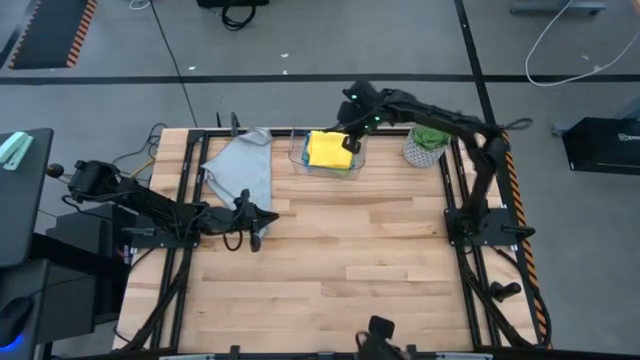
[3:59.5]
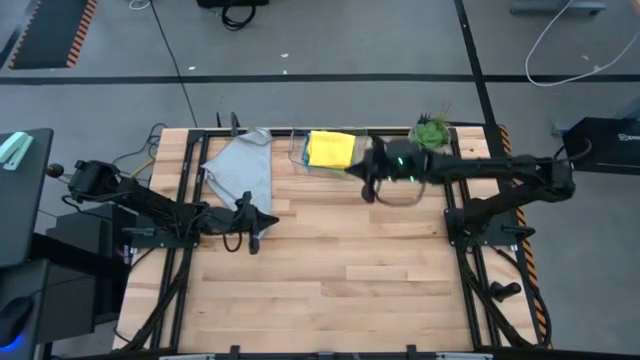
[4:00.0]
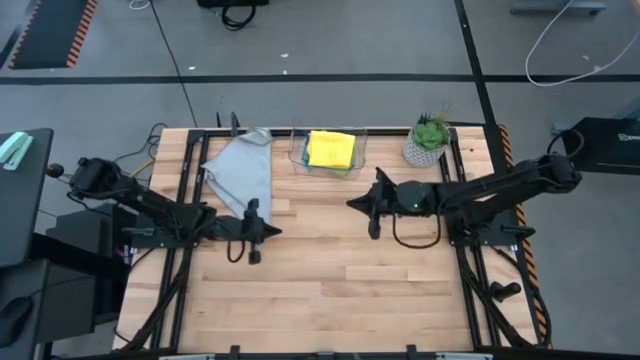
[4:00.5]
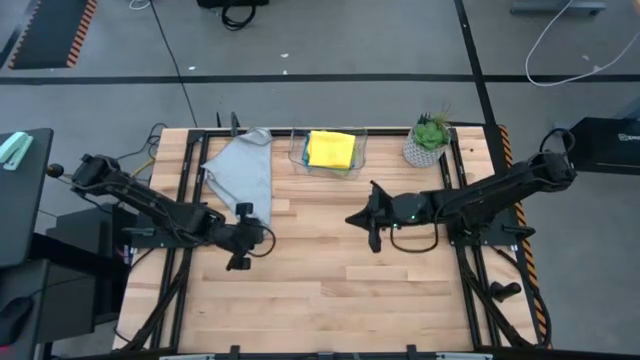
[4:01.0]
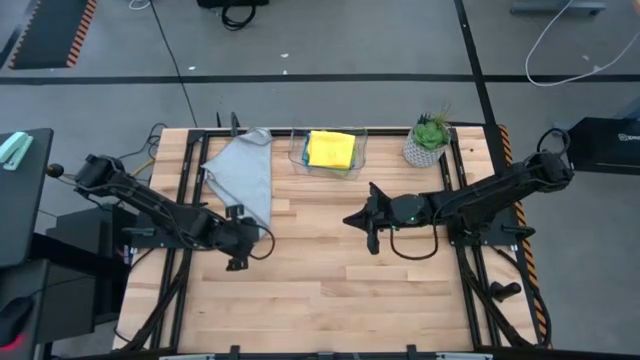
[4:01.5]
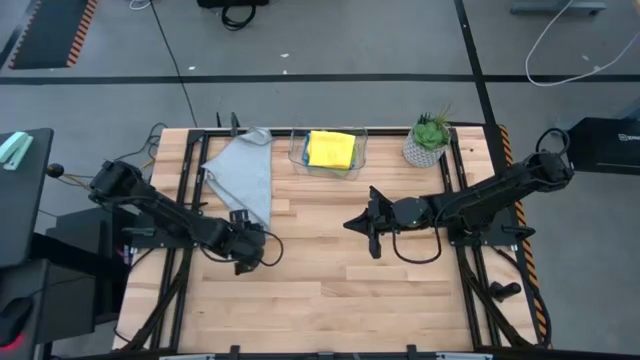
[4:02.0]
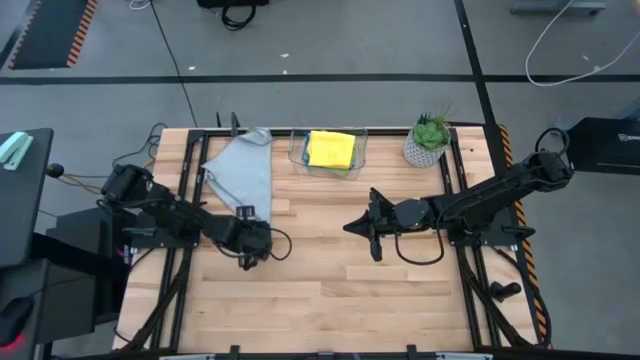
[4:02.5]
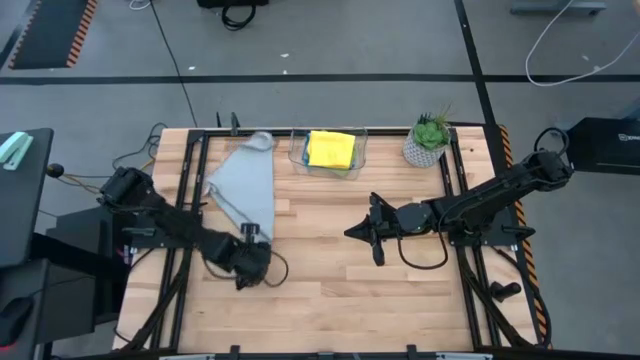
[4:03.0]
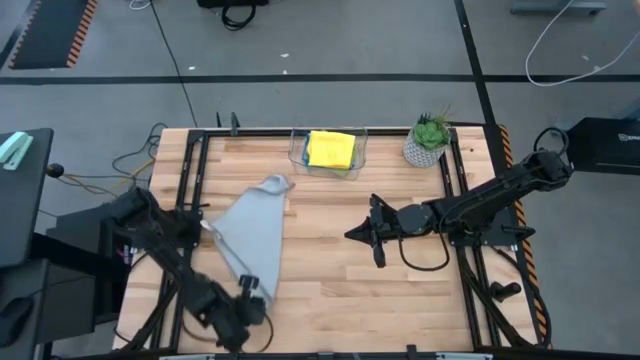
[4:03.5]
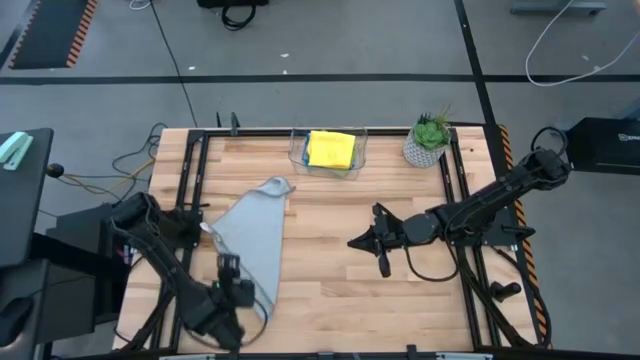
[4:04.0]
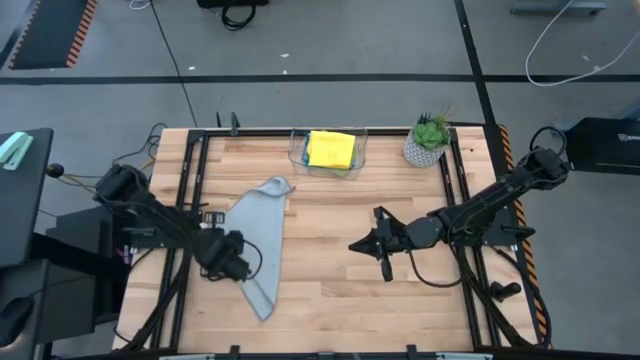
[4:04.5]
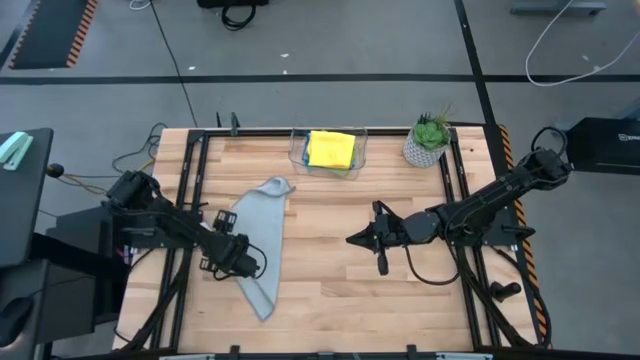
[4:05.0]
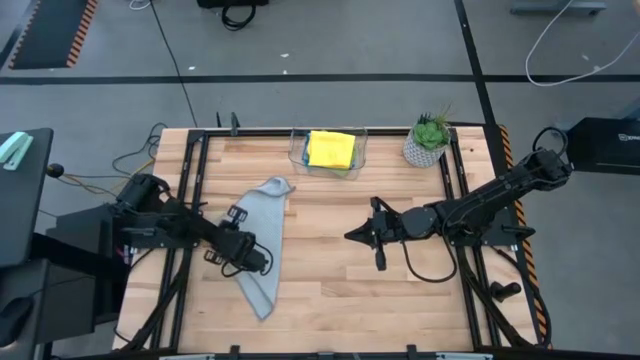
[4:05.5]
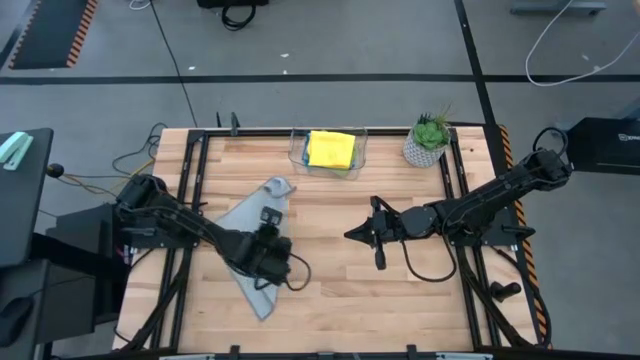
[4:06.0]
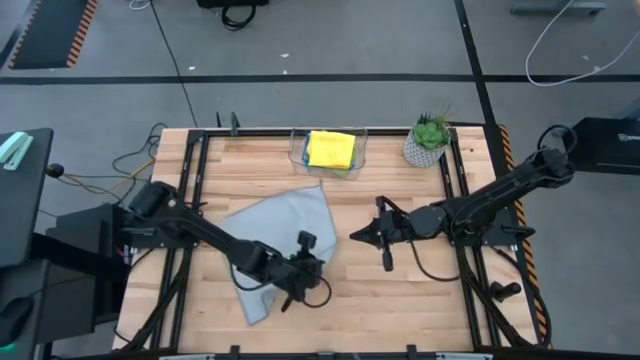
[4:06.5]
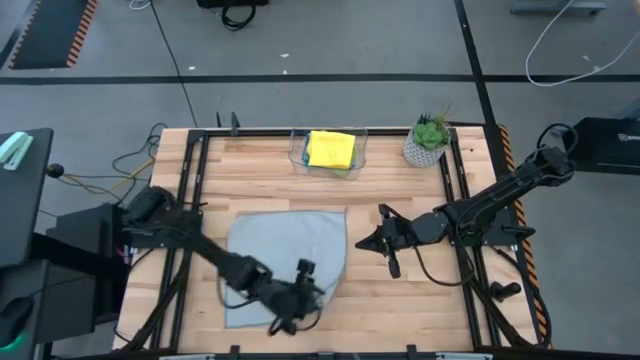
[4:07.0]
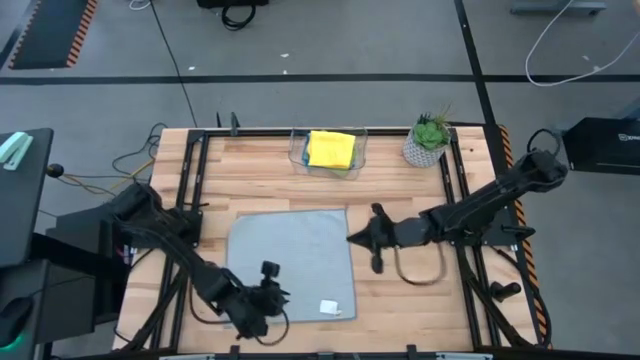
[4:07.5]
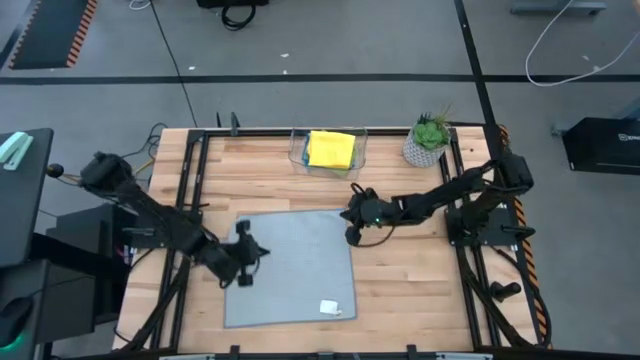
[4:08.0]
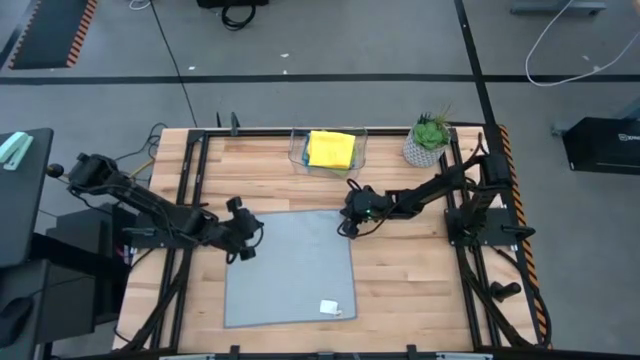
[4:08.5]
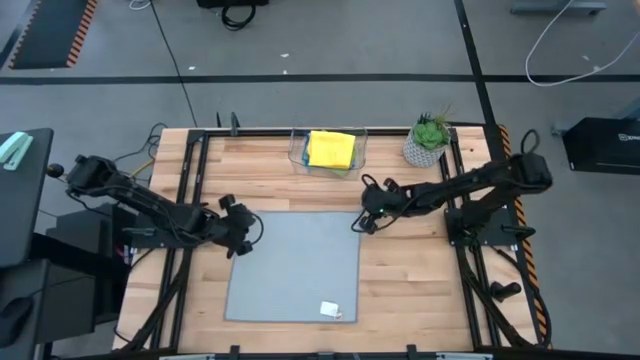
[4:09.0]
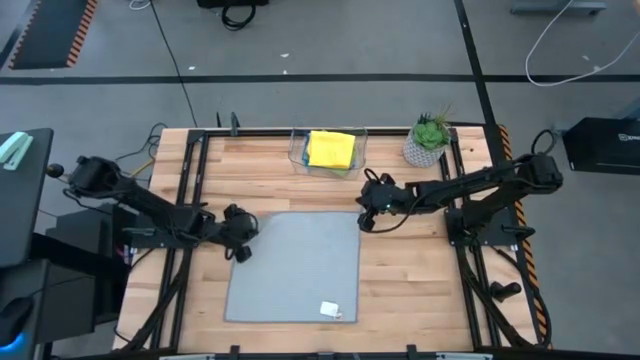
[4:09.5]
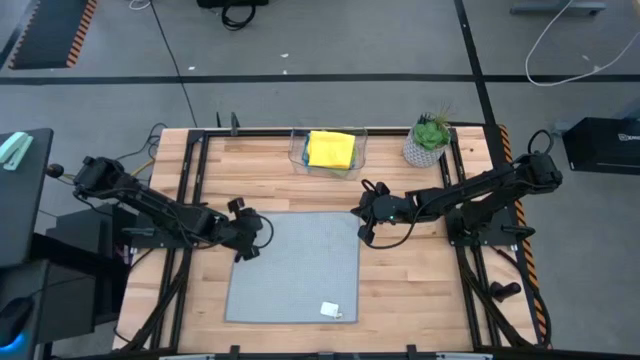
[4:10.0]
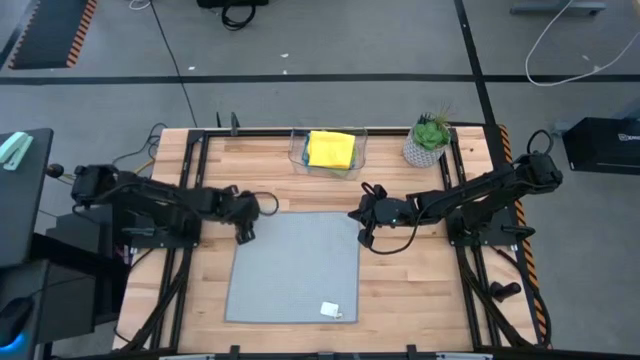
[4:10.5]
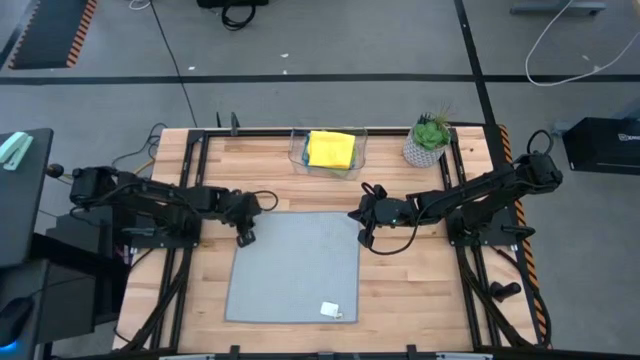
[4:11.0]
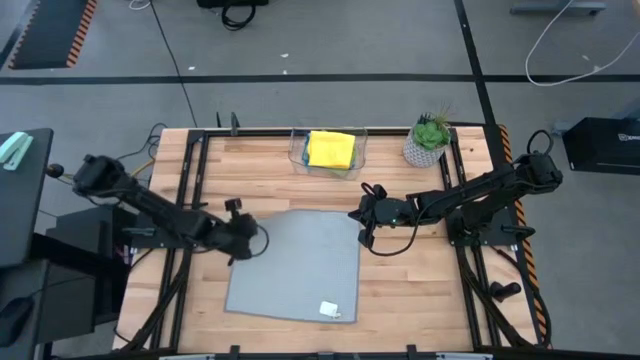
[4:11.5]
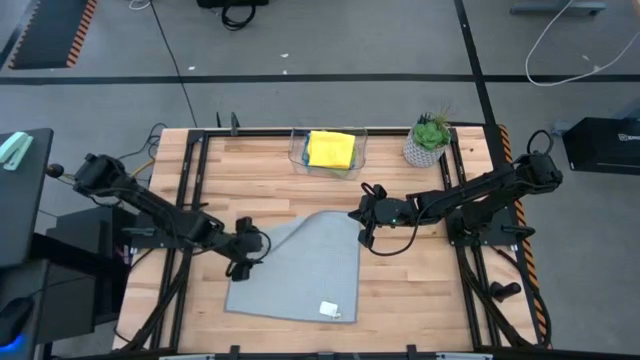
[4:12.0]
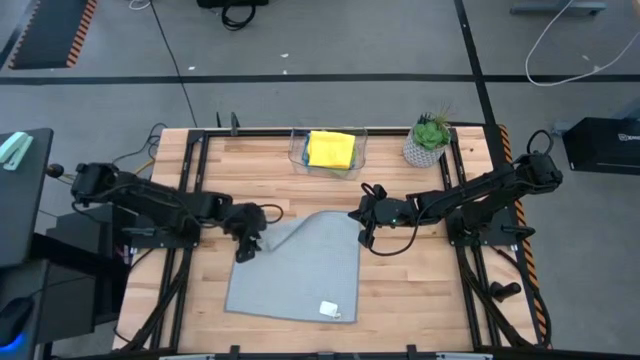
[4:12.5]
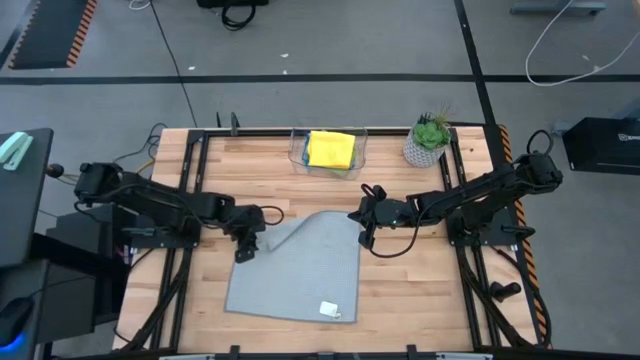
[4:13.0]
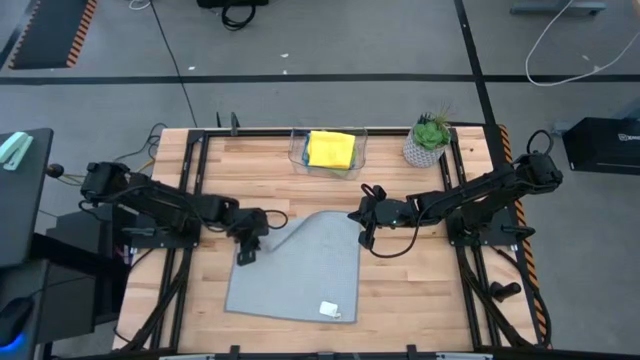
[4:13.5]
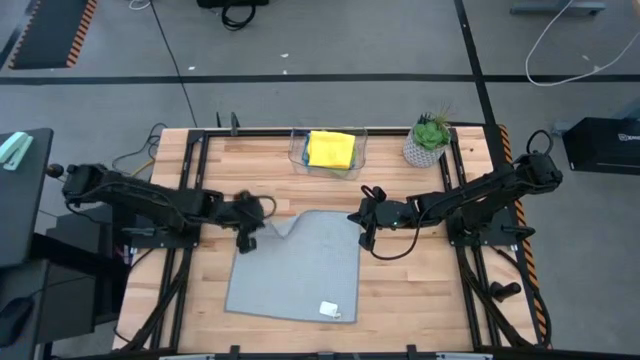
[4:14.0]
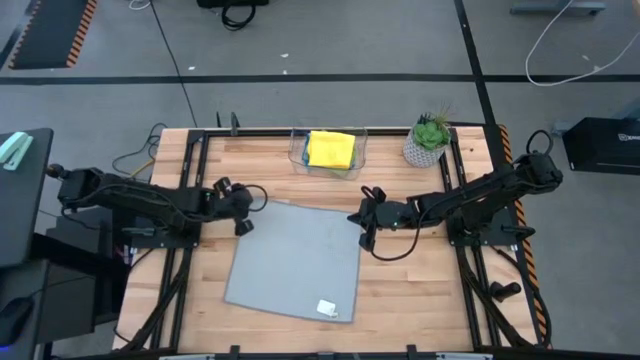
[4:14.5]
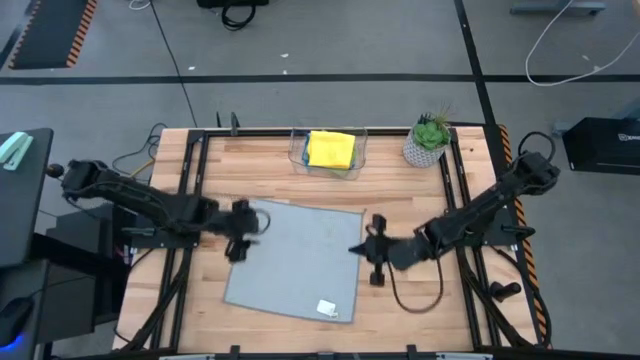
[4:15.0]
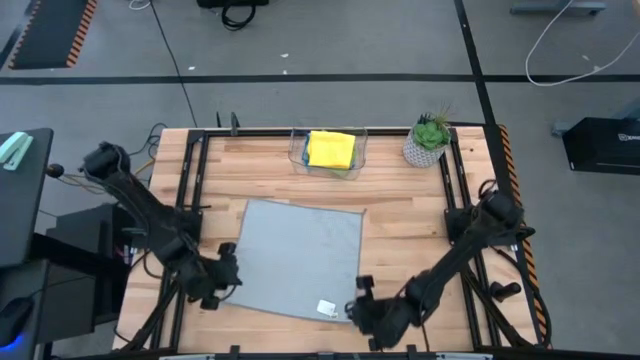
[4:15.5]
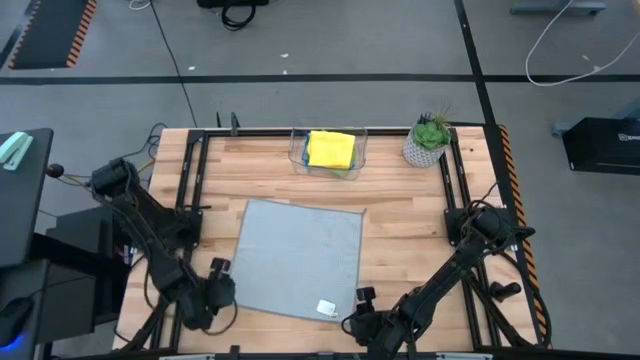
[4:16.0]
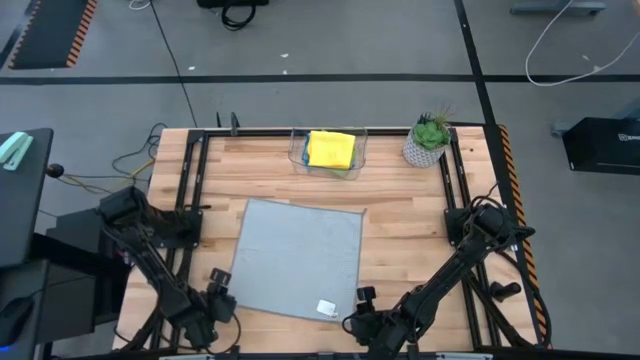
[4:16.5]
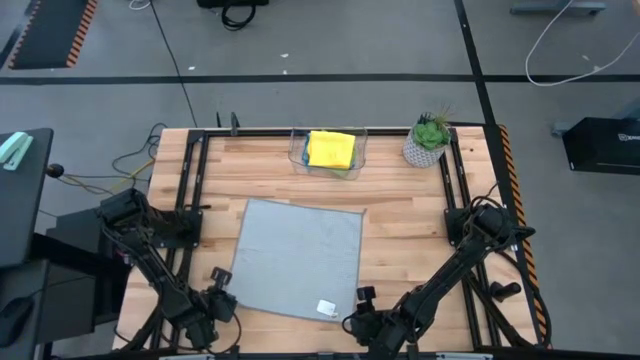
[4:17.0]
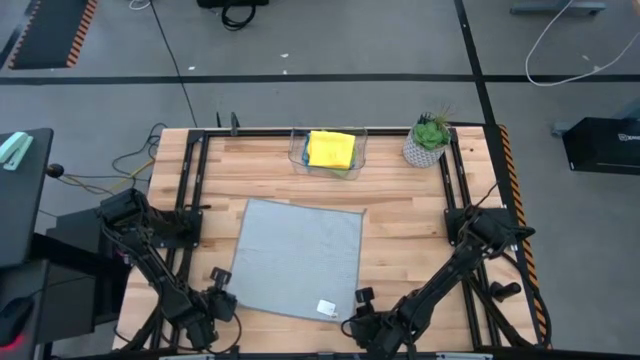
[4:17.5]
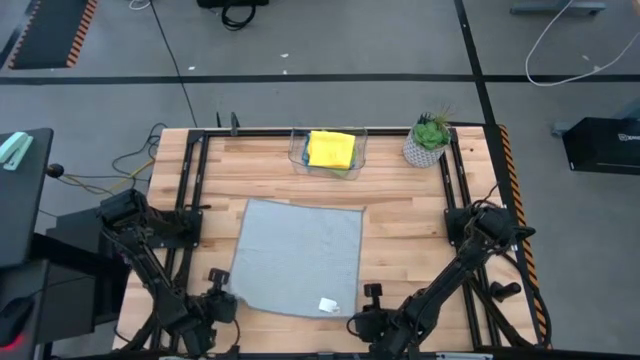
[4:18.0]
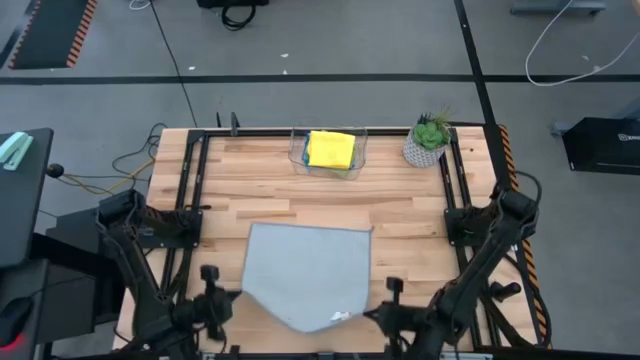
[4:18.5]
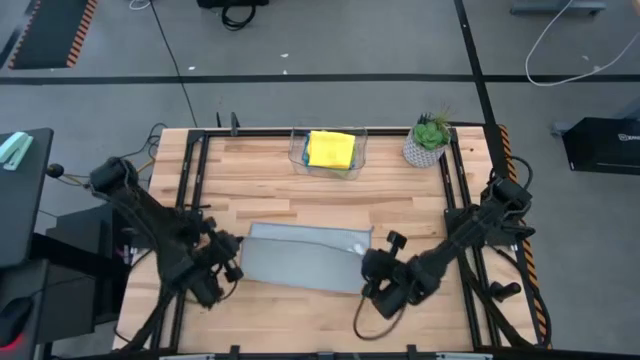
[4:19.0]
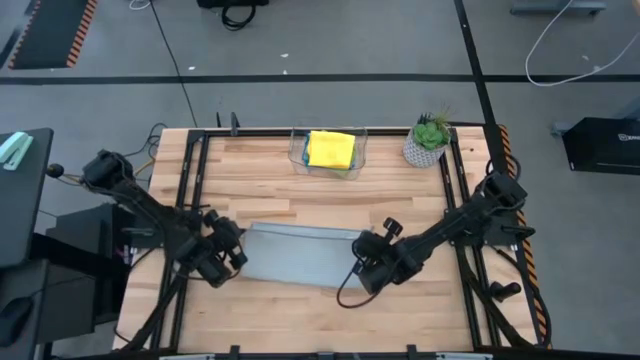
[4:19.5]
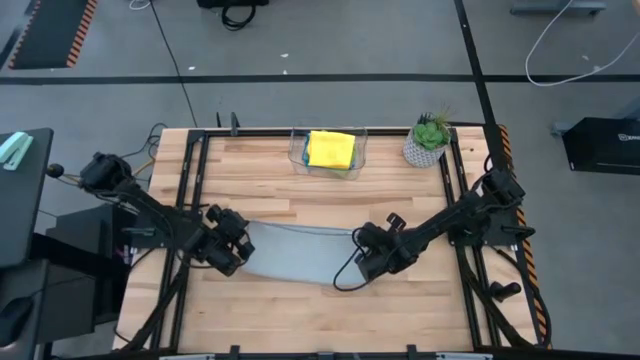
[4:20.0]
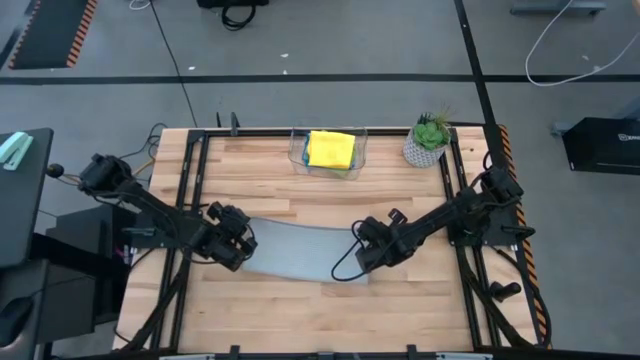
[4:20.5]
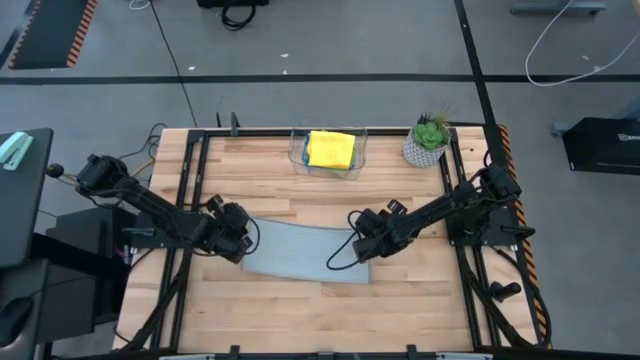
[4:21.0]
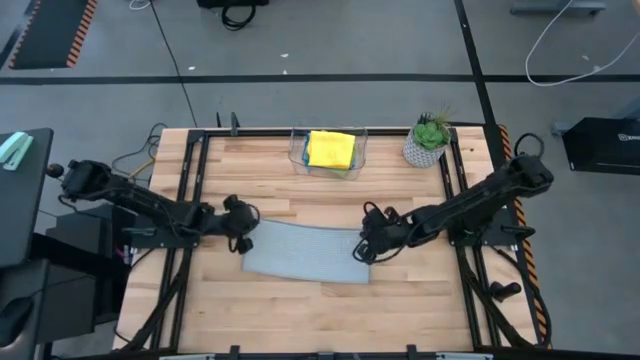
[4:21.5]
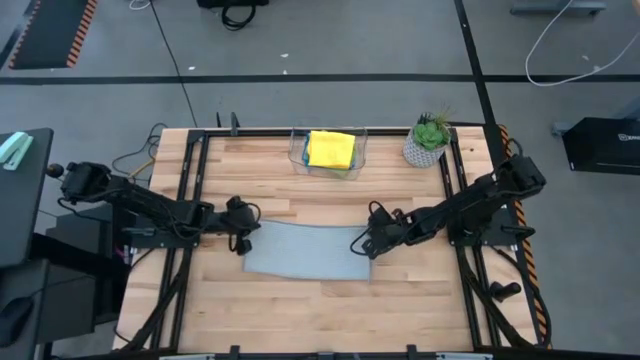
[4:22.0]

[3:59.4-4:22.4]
Task: Fold microfiber towels
Fold the gray microfiber towel
